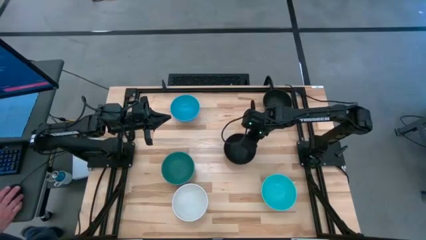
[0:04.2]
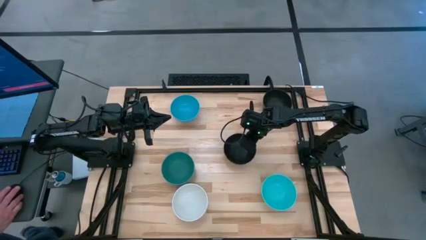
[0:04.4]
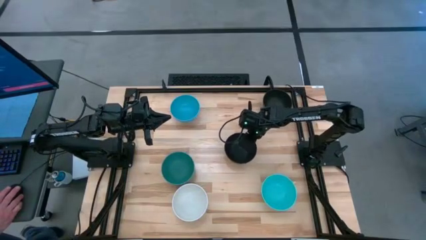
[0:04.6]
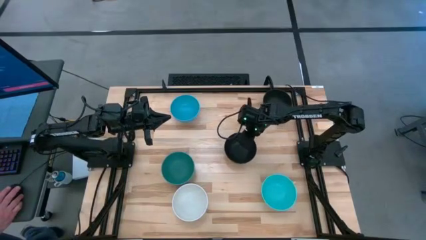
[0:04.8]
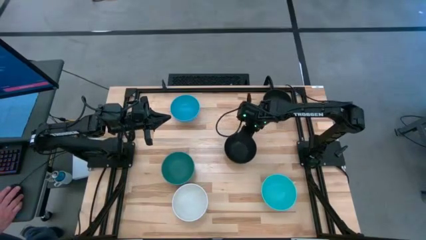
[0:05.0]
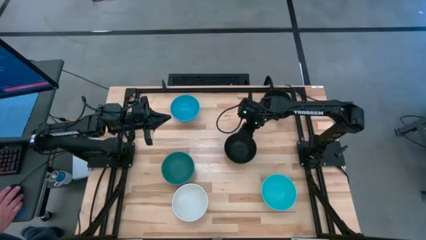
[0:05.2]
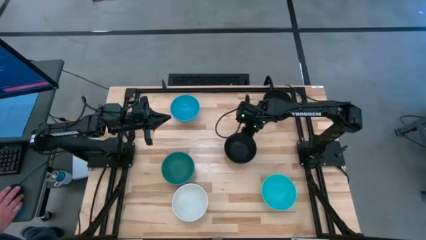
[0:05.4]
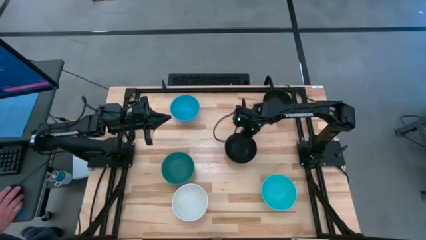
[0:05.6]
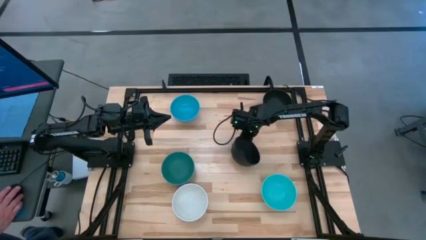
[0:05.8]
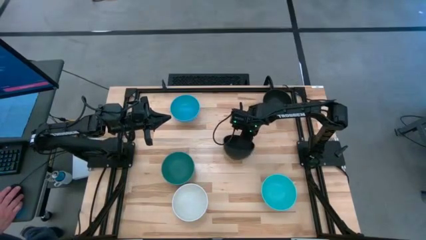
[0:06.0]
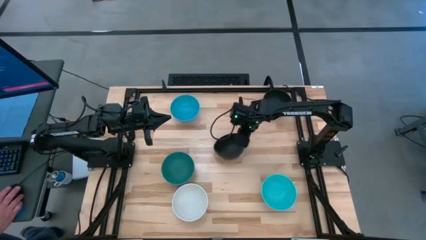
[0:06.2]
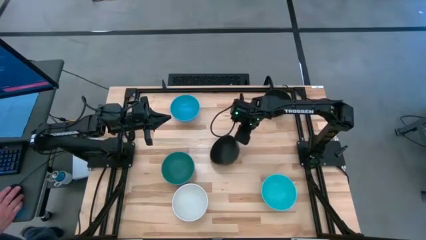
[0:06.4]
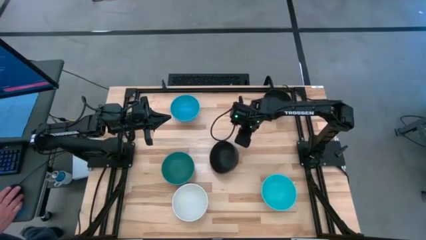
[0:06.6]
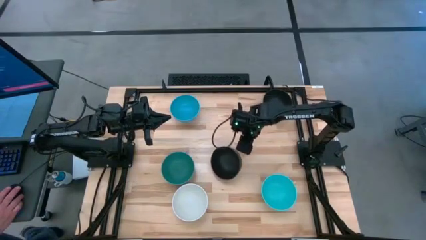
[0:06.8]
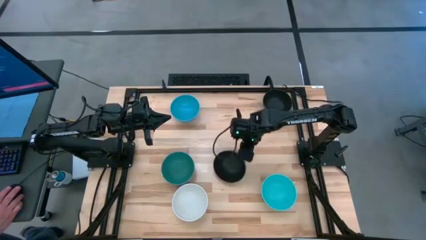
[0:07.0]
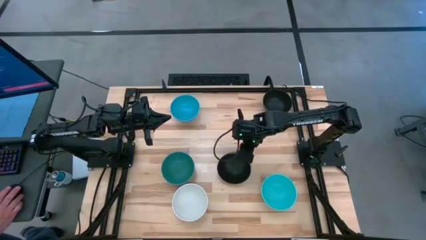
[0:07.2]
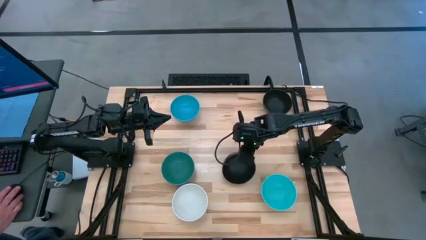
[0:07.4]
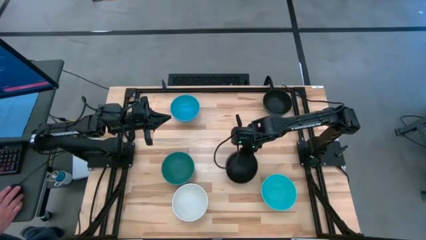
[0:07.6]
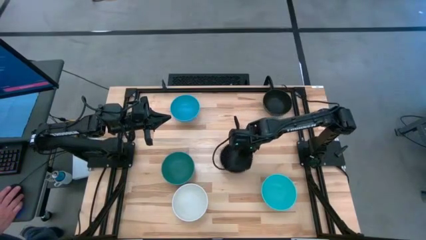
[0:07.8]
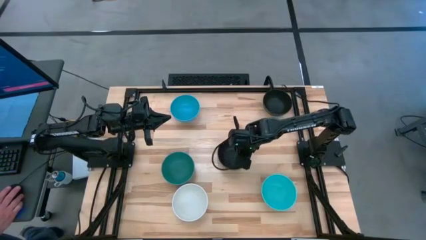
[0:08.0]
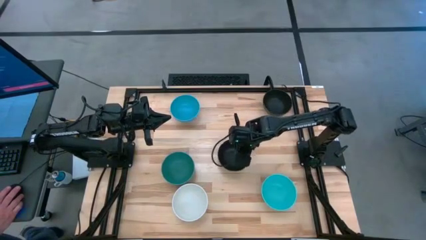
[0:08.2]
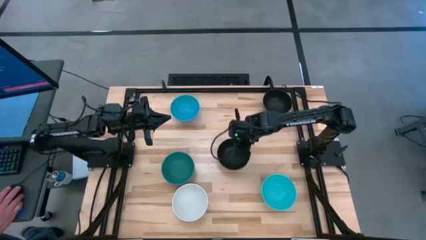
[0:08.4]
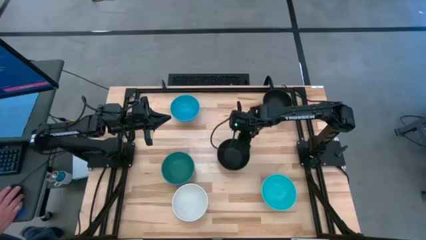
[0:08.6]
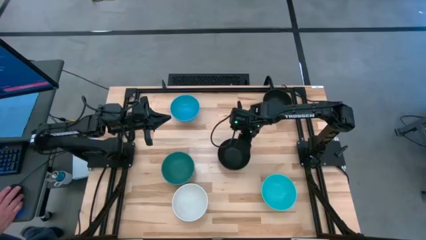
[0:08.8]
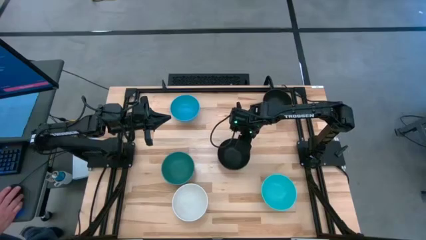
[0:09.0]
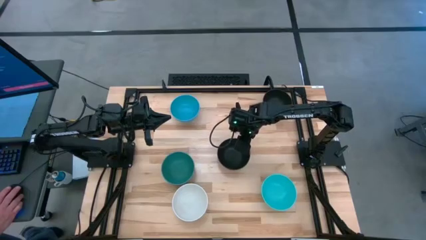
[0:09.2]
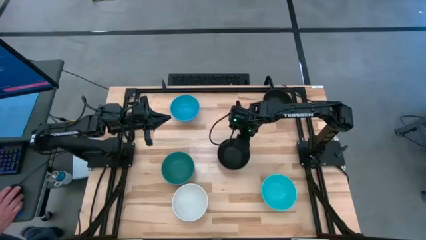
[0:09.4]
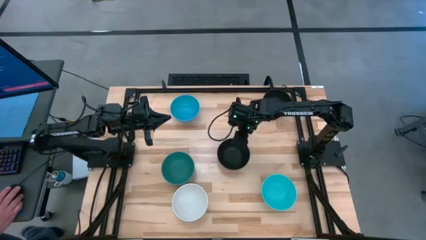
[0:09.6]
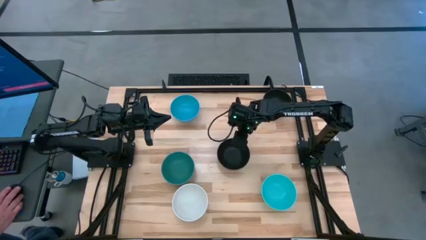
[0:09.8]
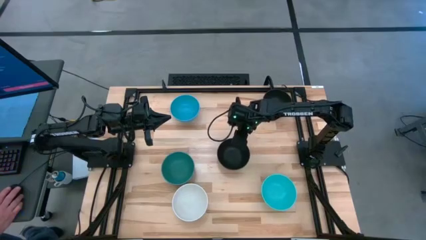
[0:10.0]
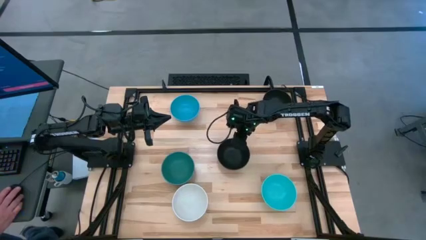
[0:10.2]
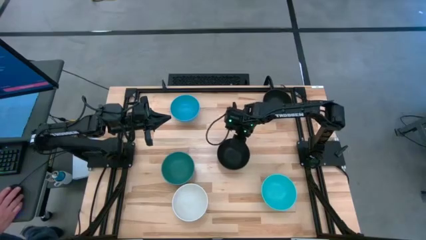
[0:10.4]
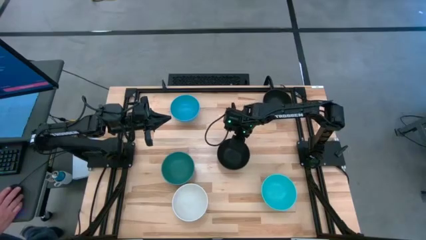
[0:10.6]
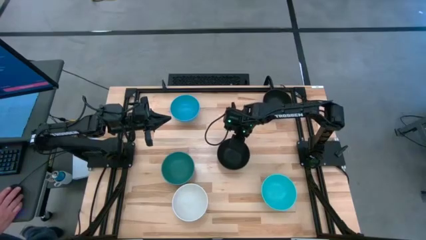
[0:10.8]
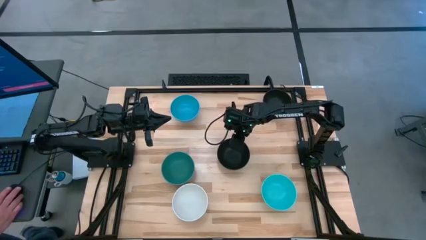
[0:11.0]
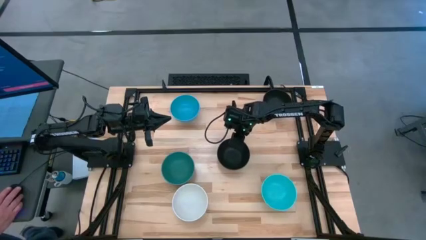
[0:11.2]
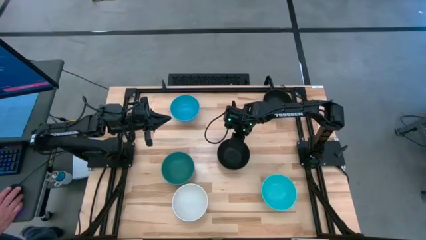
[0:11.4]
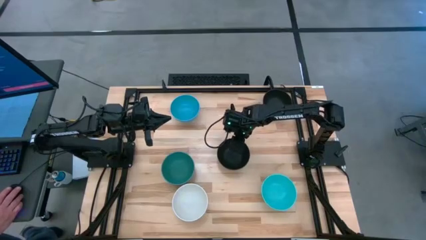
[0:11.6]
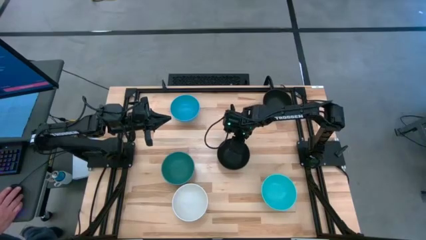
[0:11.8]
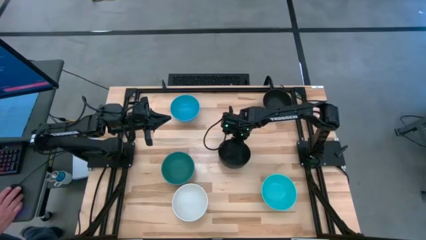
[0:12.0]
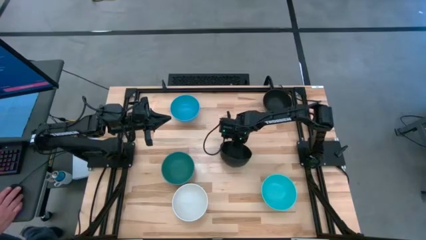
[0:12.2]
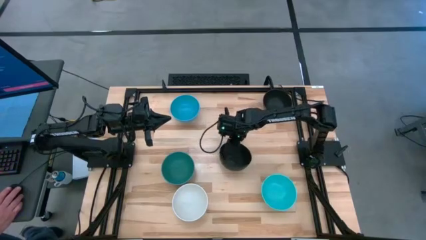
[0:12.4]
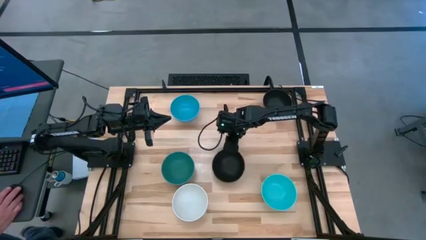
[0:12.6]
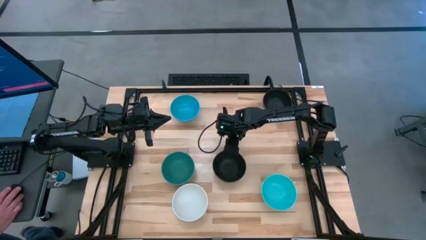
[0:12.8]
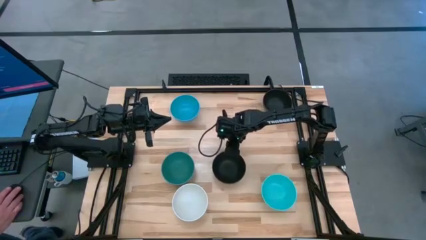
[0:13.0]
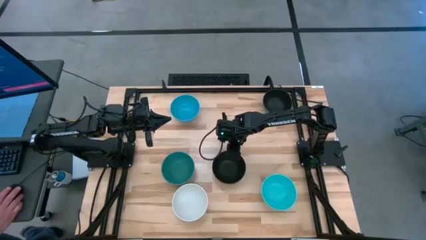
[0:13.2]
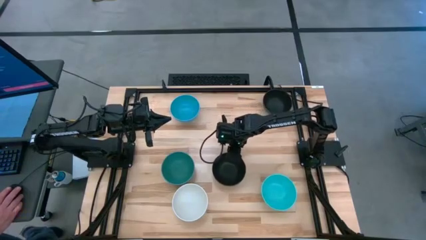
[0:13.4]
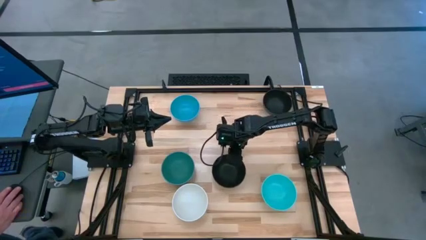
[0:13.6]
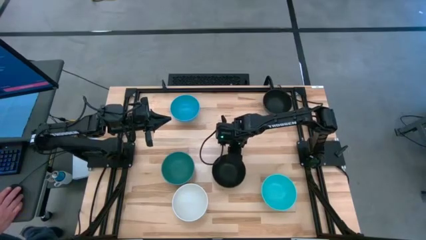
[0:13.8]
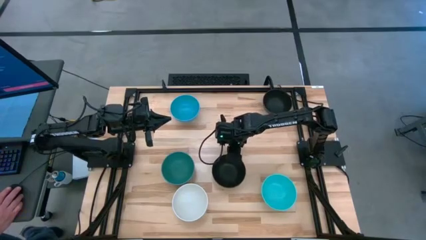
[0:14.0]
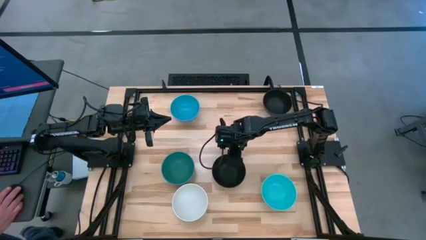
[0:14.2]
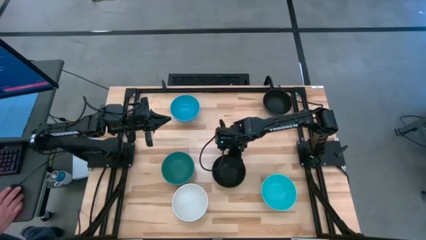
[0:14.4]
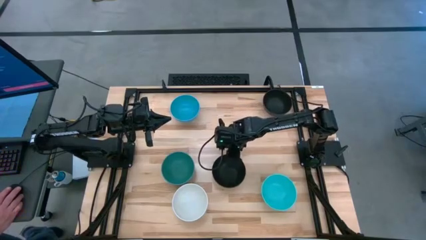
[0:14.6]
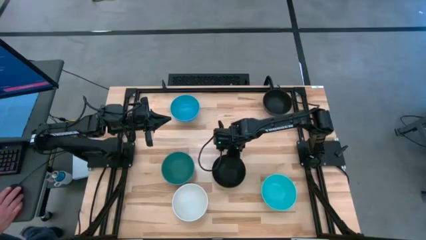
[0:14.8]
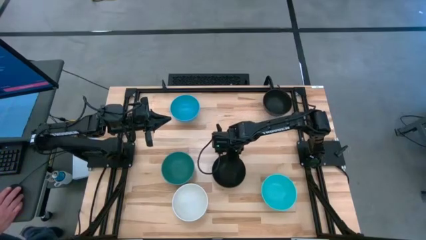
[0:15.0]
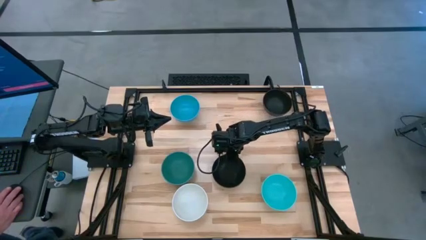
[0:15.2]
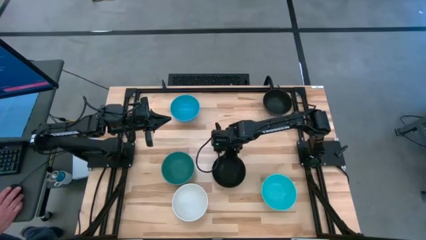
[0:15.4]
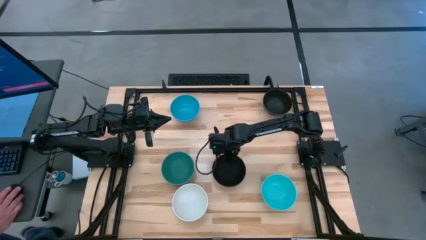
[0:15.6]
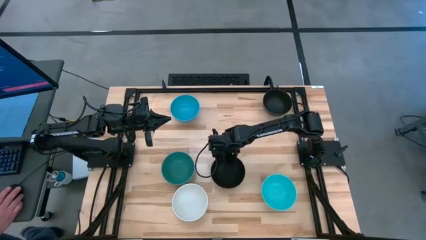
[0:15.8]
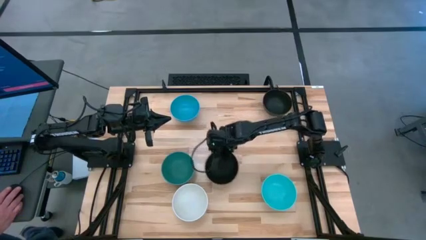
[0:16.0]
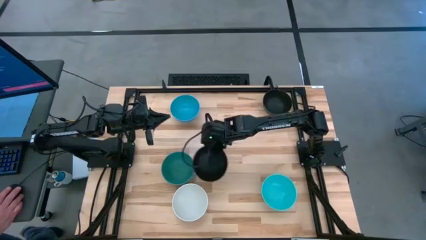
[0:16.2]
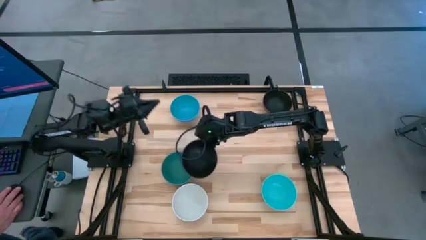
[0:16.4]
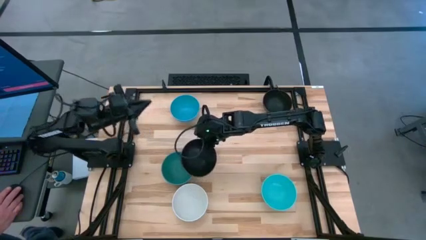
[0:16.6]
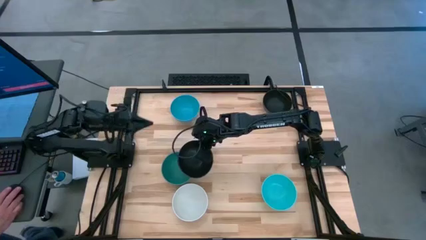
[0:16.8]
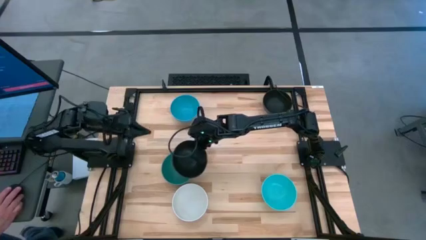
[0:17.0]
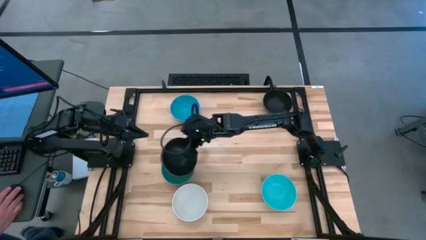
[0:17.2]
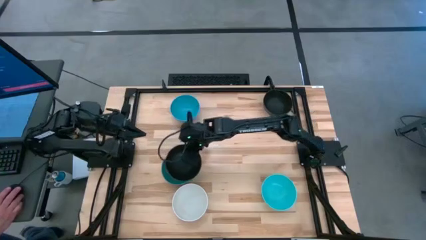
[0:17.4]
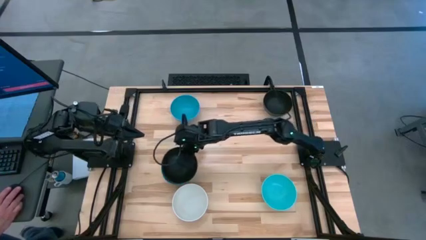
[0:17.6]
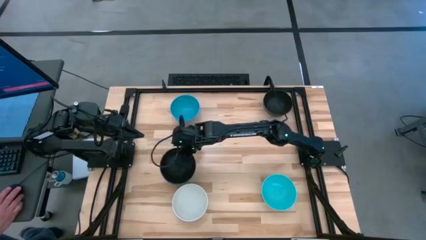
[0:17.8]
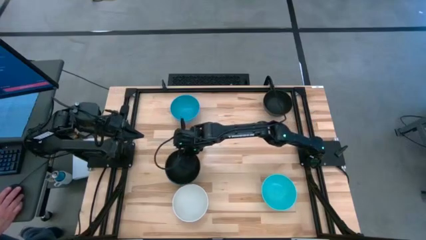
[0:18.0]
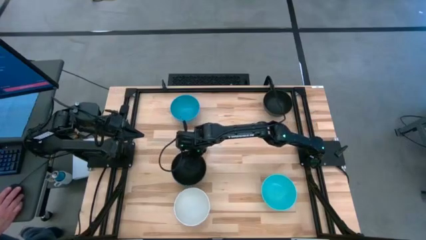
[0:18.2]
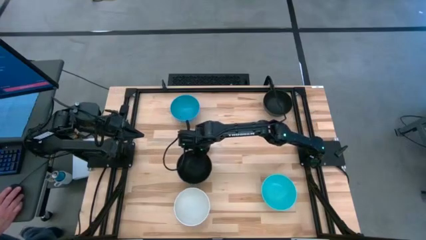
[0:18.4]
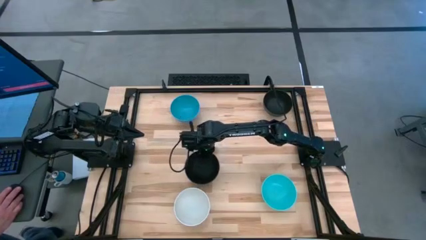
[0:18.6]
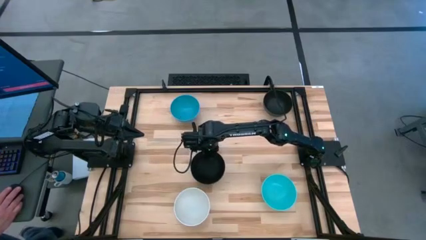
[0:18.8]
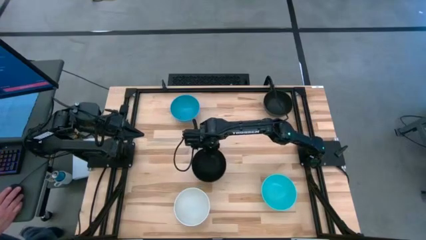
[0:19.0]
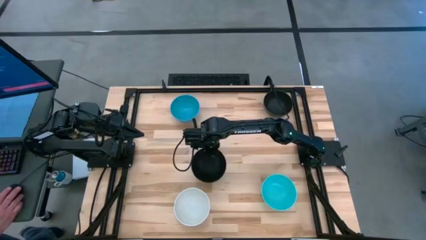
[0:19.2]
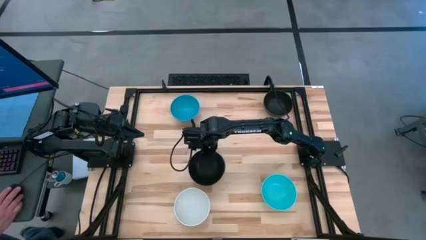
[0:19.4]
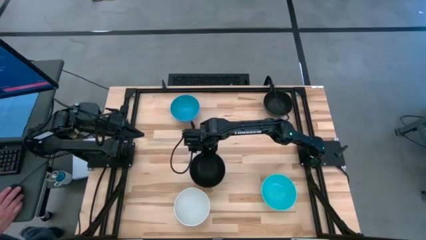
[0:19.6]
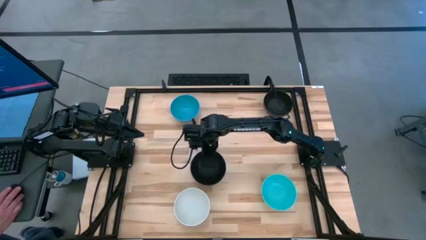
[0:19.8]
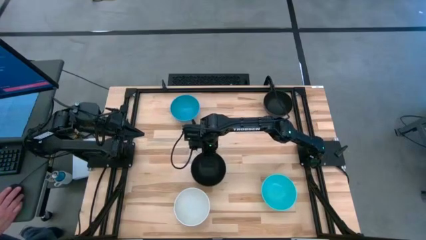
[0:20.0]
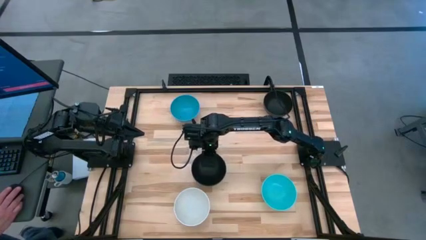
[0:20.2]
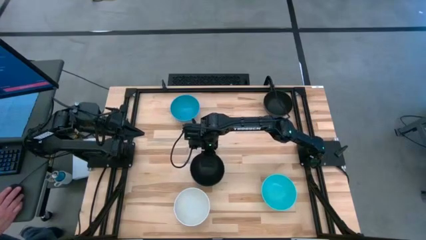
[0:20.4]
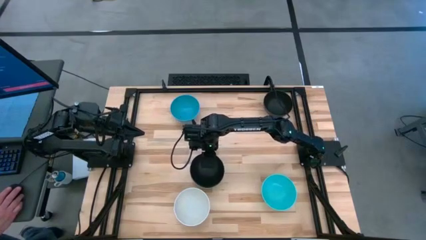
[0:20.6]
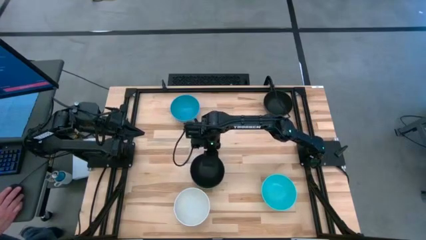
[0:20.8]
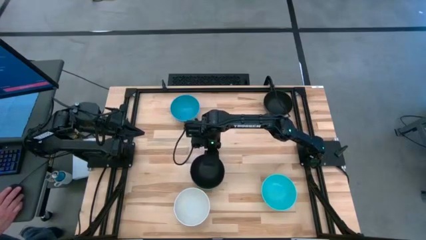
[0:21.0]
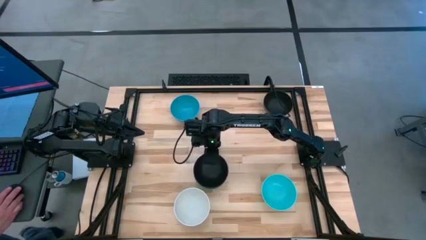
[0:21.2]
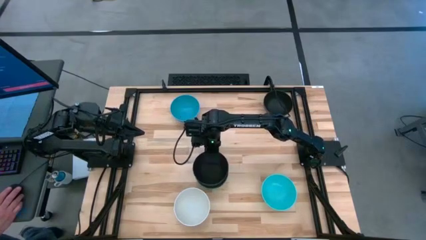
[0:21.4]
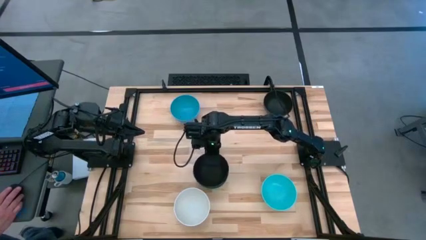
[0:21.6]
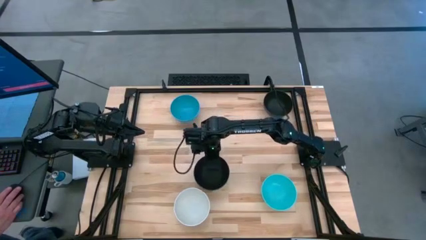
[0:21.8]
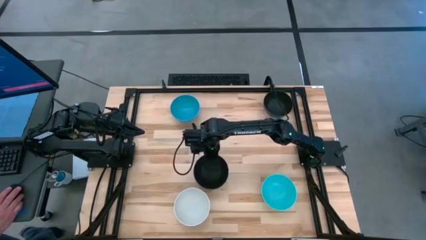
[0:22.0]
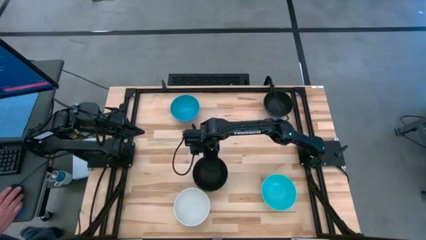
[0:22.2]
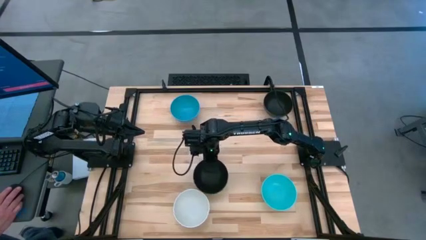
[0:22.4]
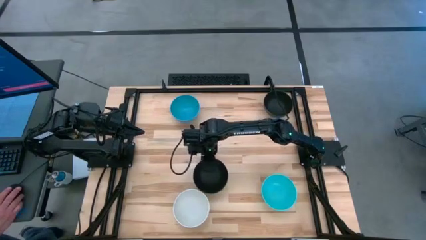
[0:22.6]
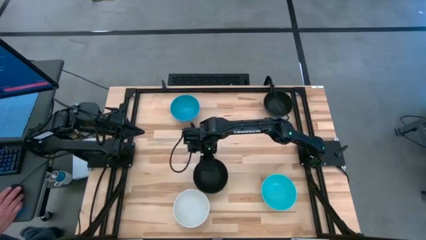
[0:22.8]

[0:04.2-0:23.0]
Task: Nest bowls inside each other
Stack the black bowl on the green bowl
